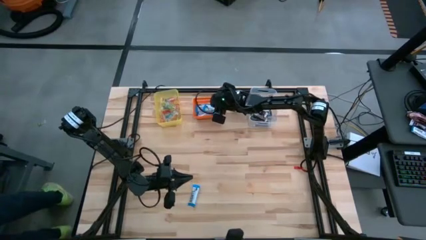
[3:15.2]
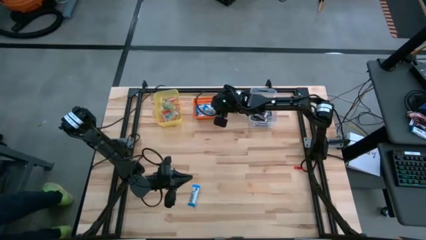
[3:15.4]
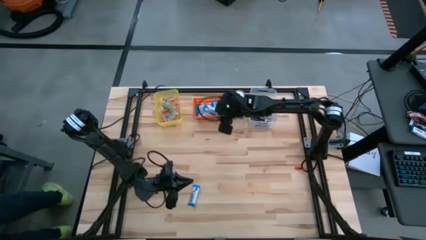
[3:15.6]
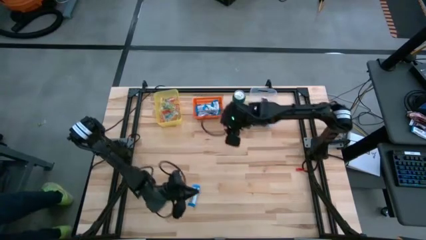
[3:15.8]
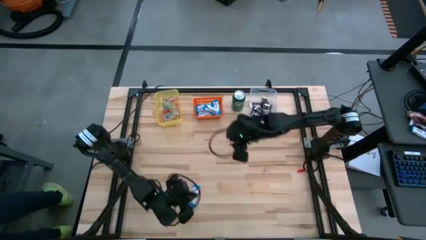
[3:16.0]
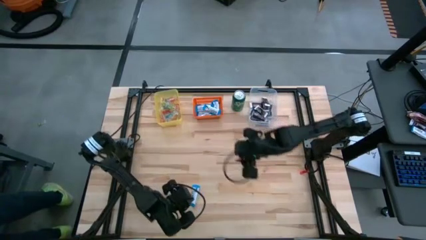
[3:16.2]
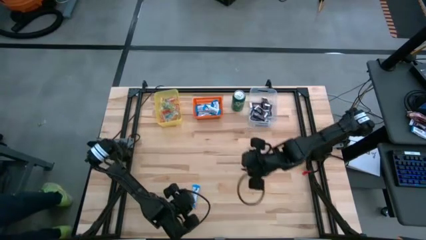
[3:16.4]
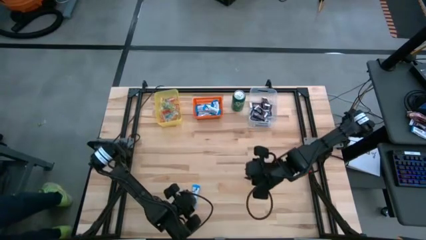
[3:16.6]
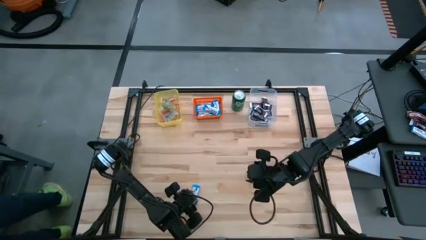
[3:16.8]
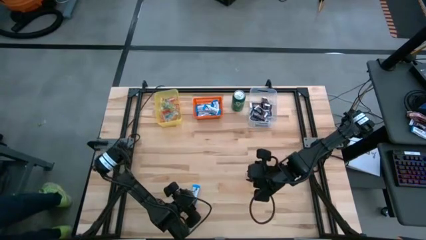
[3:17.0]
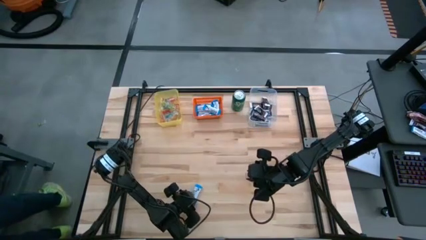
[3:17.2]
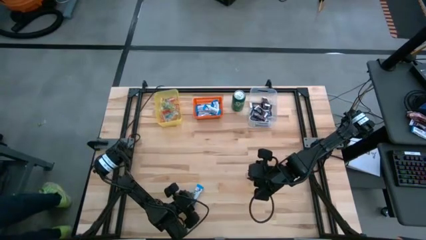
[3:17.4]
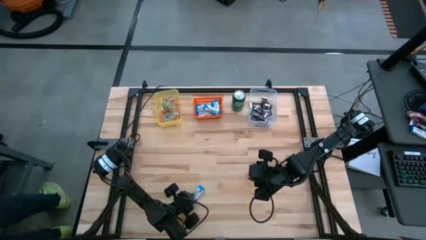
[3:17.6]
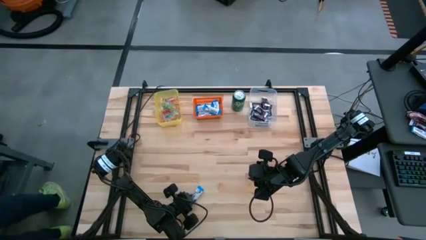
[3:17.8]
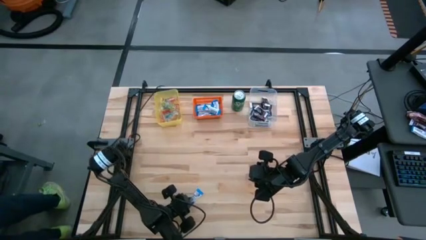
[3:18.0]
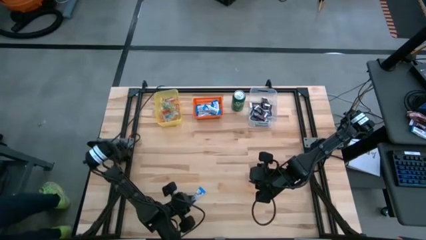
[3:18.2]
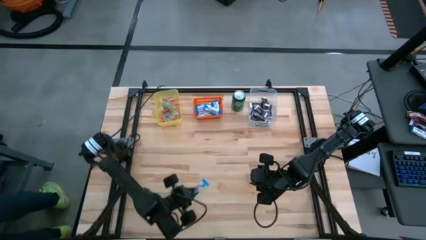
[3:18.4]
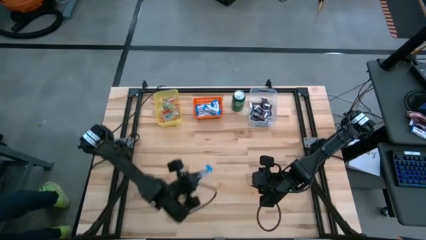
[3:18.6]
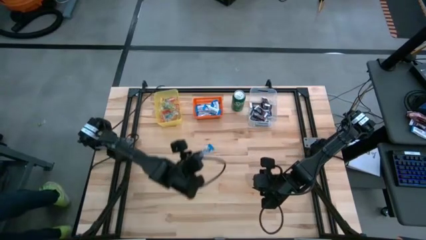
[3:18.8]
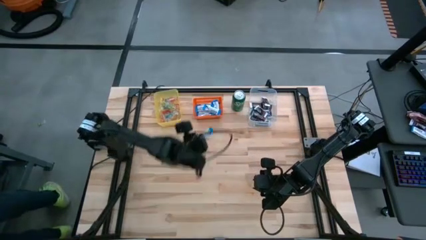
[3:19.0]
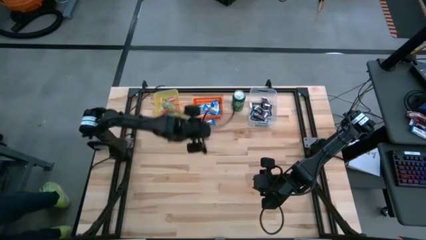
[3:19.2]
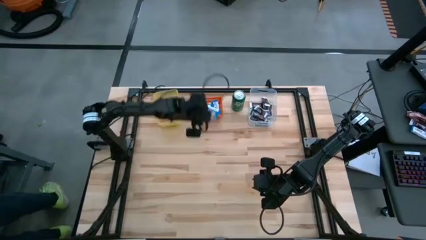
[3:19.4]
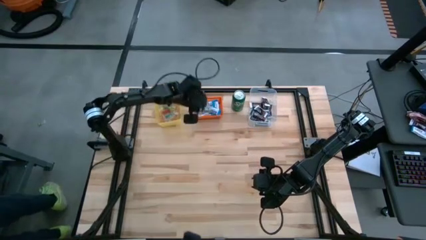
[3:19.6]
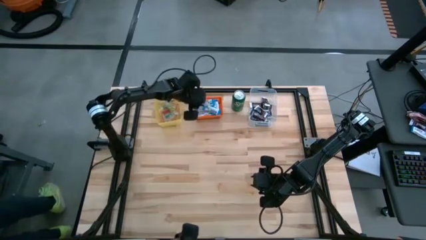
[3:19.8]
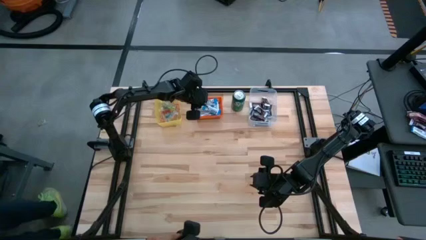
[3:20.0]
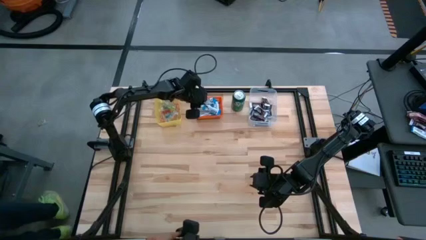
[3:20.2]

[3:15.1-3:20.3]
Task: Organize candy in baskets
Put the white chocolate into the orange bin

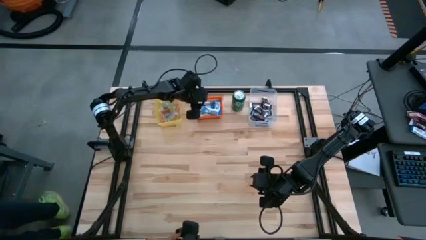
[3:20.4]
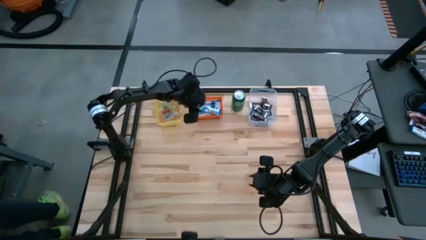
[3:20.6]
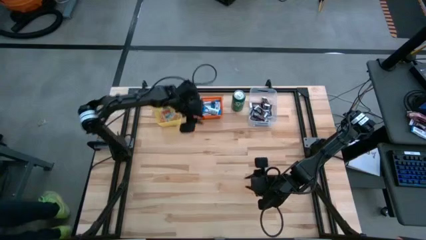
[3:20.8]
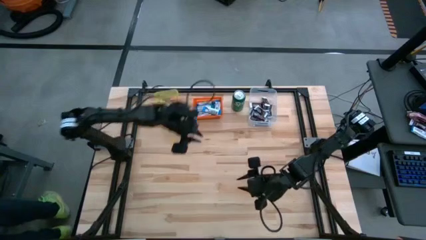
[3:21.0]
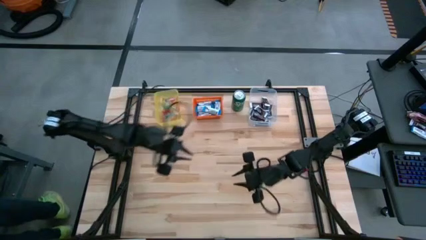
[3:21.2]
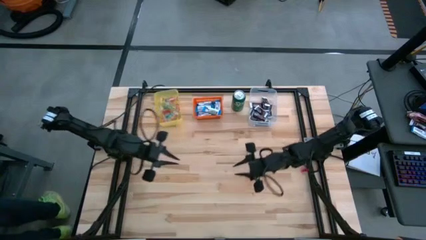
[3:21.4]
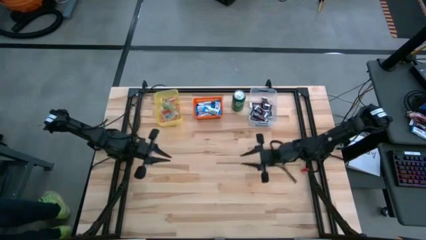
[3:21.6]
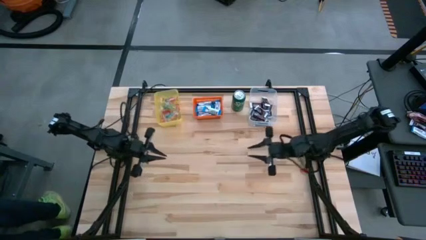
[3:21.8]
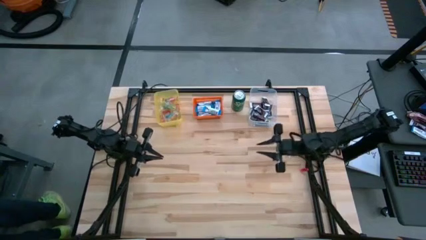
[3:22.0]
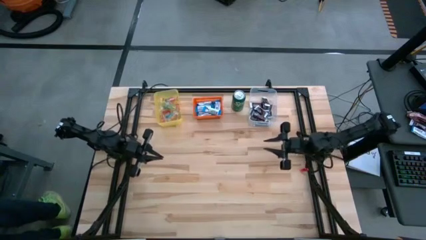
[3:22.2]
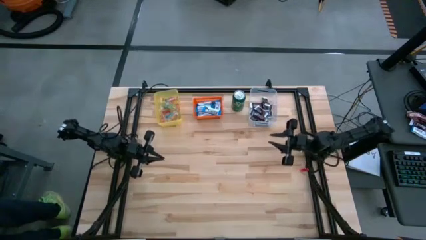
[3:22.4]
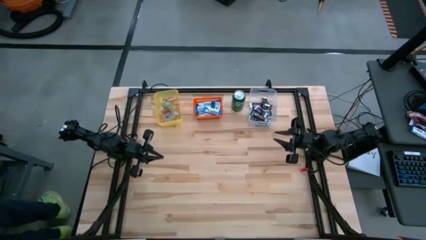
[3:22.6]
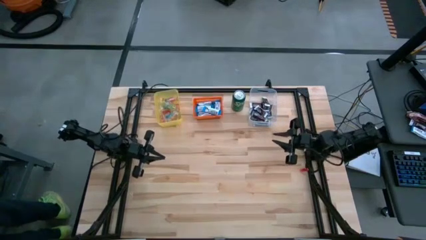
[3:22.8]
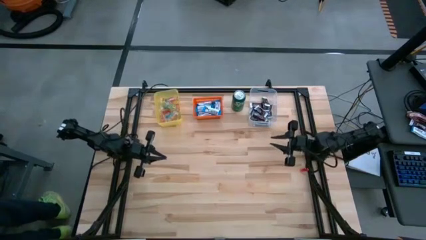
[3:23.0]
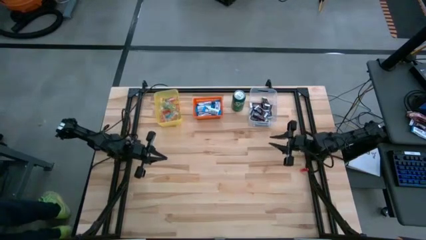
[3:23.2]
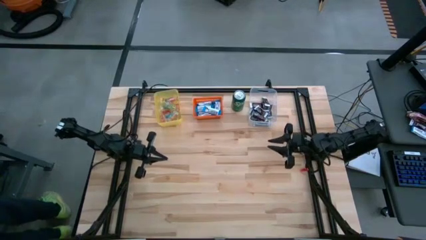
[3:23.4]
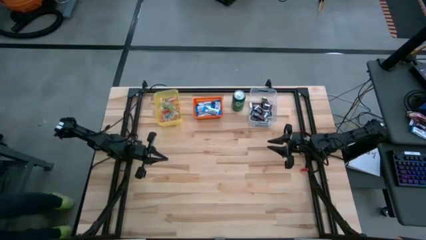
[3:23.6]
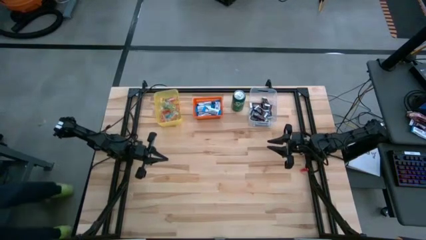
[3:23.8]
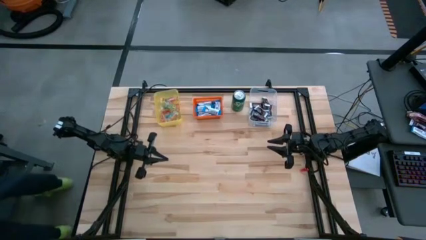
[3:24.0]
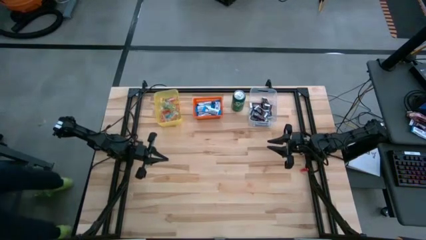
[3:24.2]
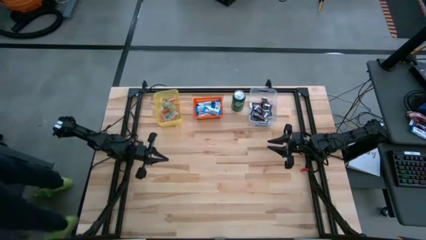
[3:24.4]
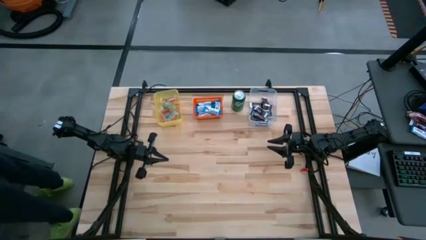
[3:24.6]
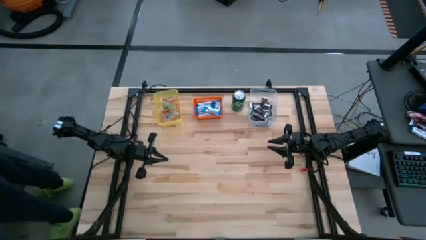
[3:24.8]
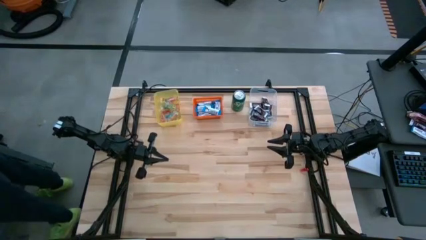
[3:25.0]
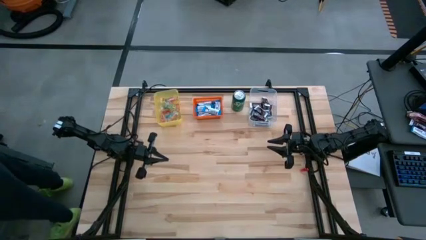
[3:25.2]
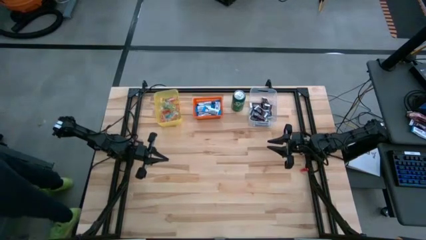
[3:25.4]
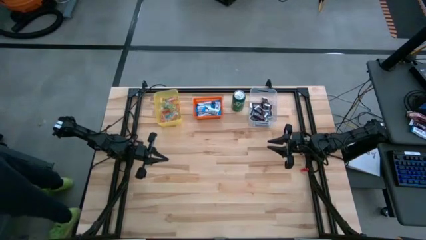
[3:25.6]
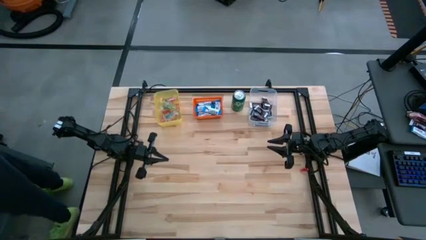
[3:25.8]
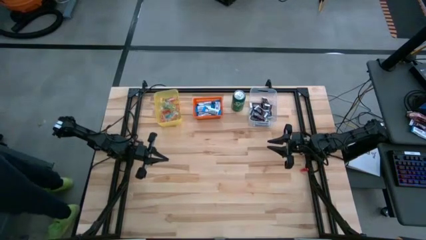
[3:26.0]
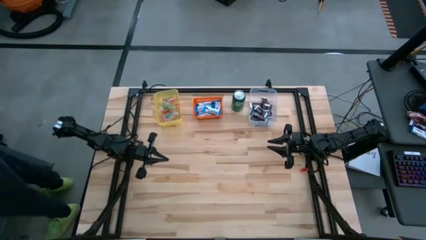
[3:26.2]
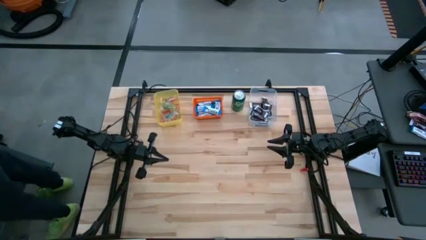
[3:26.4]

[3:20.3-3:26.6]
Return to Home Position
